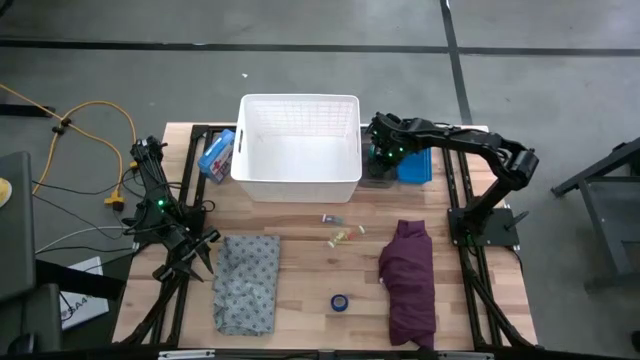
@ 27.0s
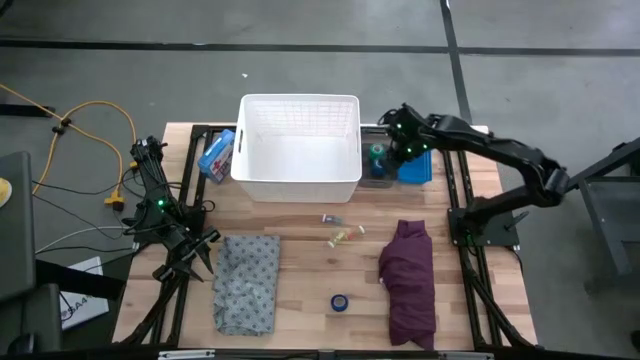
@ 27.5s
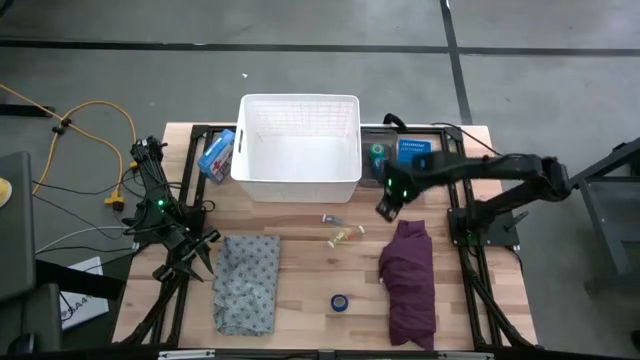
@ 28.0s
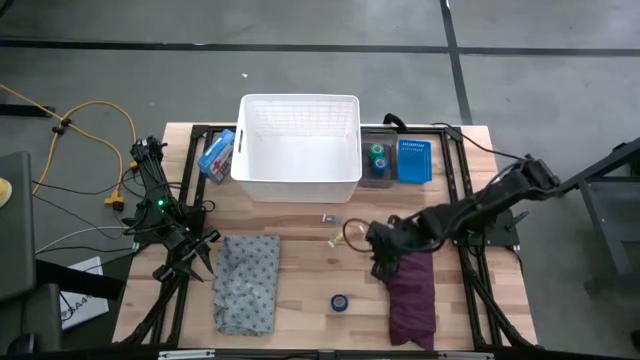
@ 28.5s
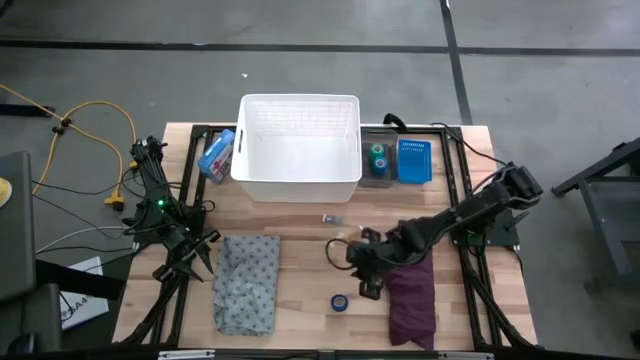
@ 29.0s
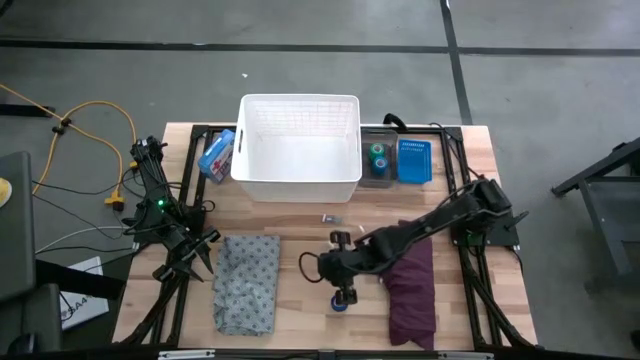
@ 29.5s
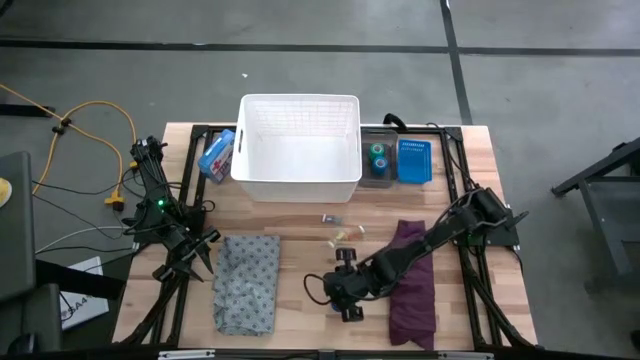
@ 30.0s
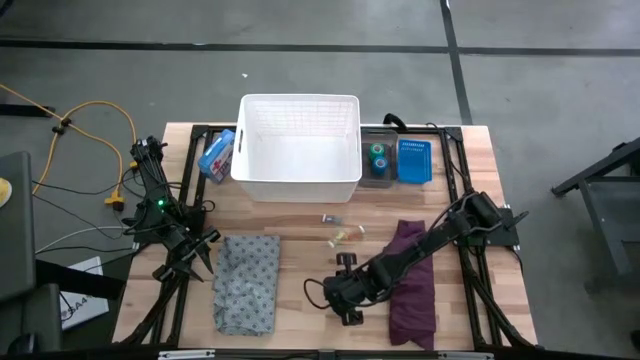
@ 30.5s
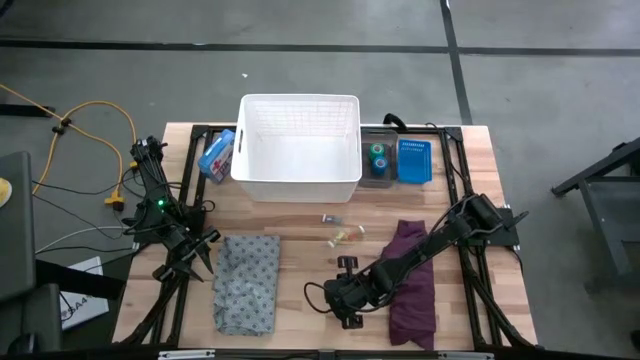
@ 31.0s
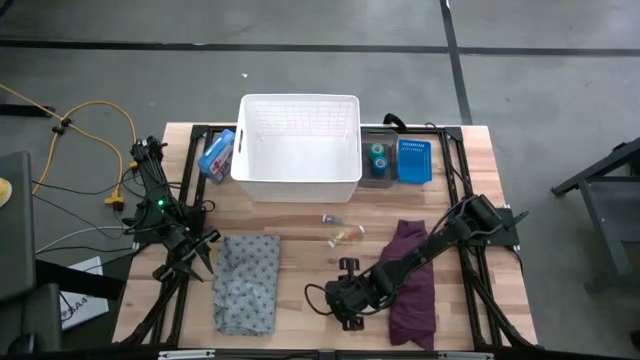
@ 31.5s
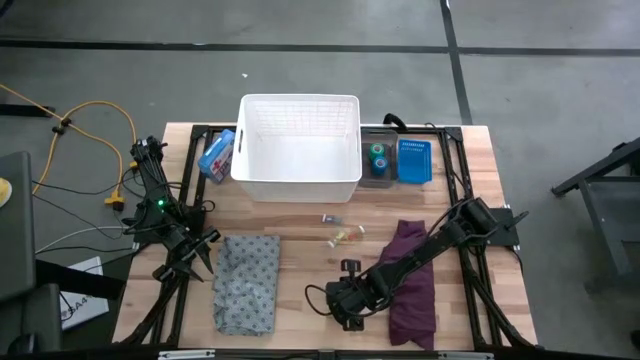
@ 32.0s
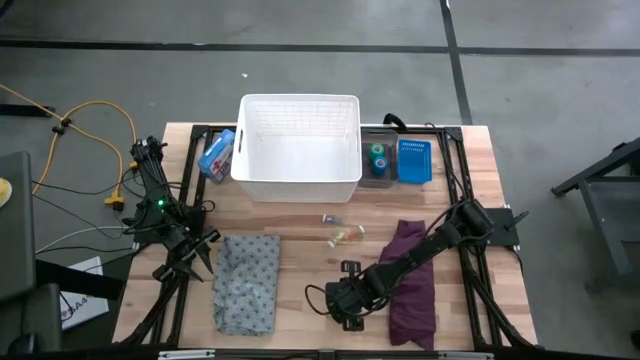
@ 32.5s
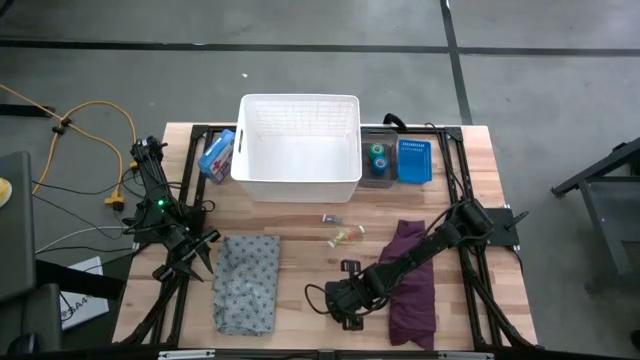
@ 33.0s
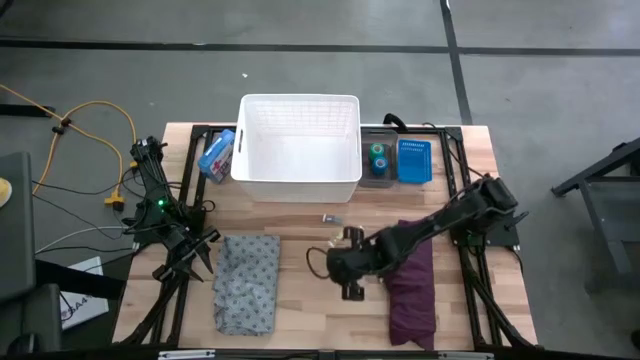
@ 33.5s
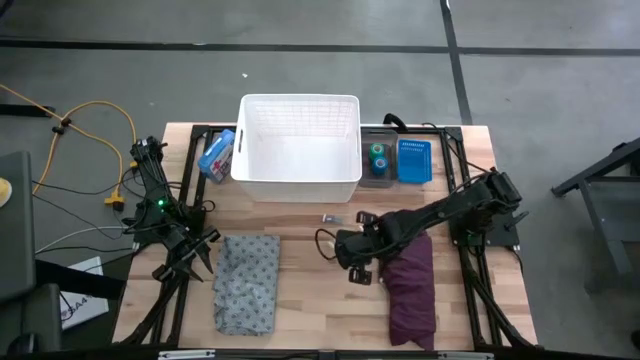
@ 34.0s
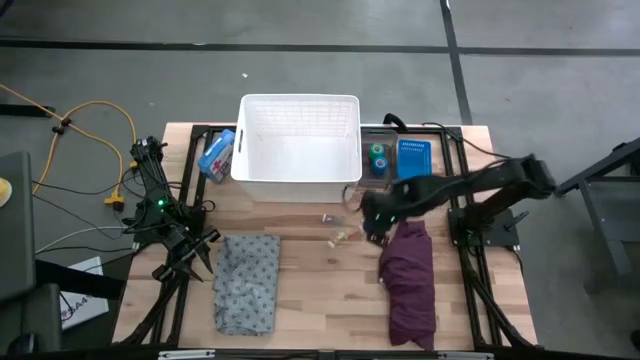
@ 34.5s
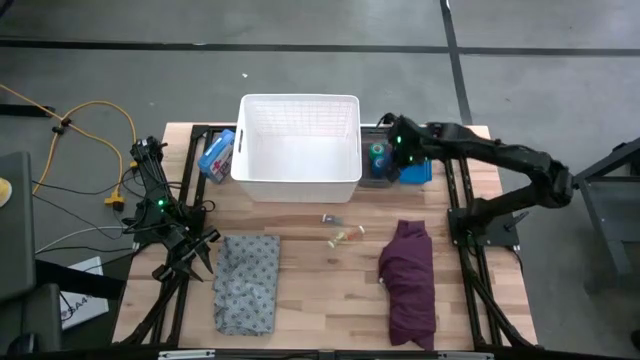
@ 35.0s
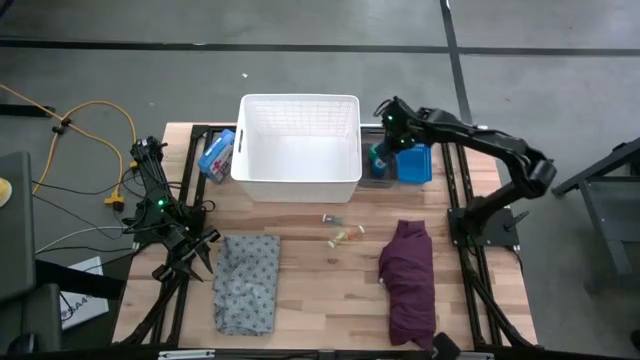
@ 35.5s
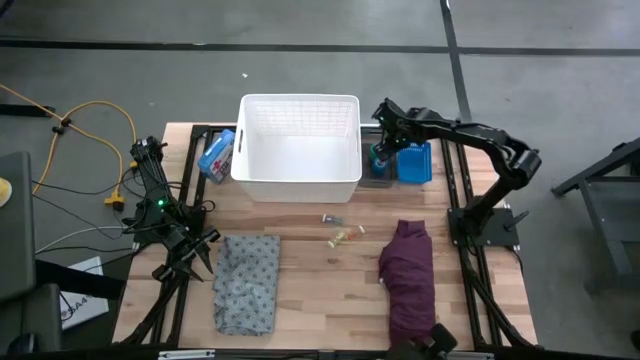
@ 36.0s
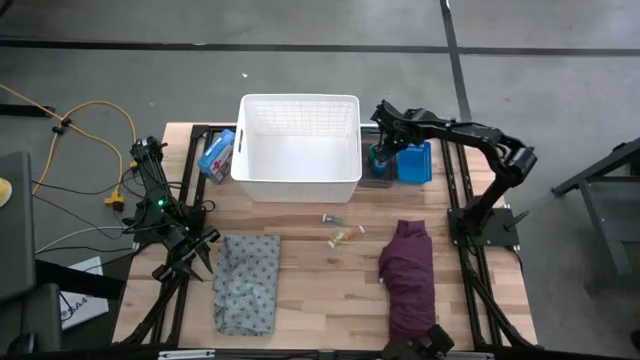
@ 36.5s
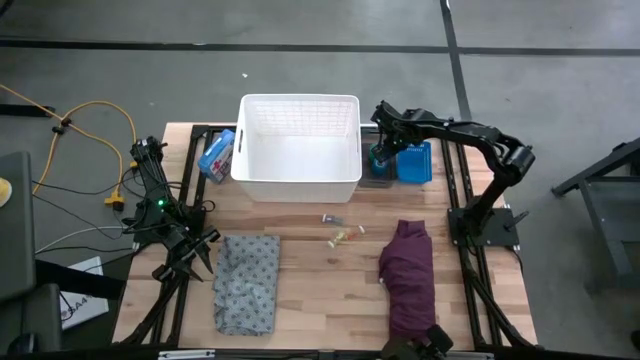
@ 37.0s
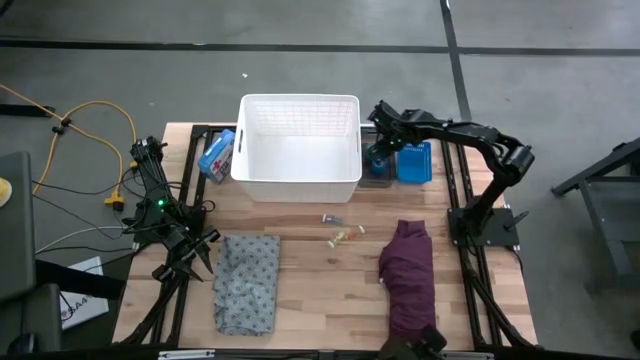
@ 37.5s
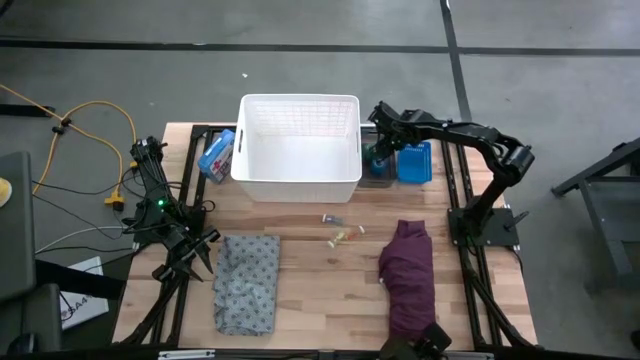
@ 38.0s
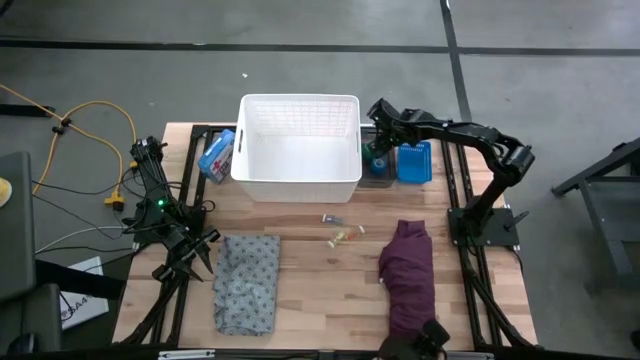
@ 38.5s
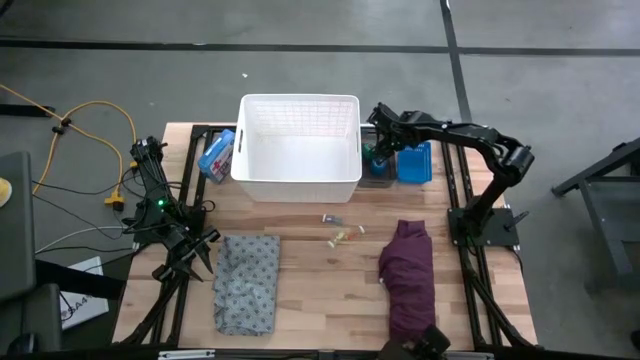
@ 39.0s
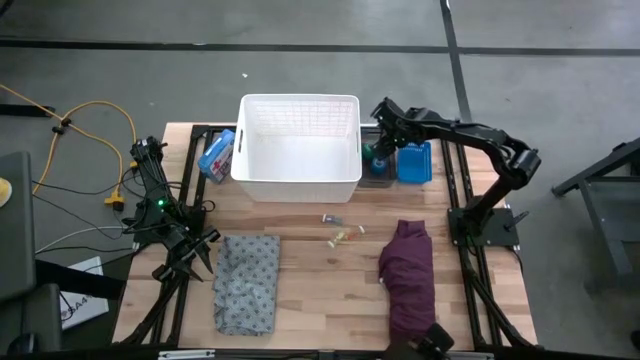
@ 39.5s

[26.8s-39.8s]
Task: Pick & Place Medicine items
Put the dark blue bandage into the black bin

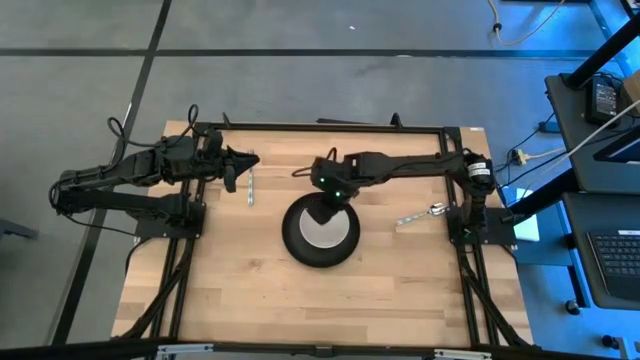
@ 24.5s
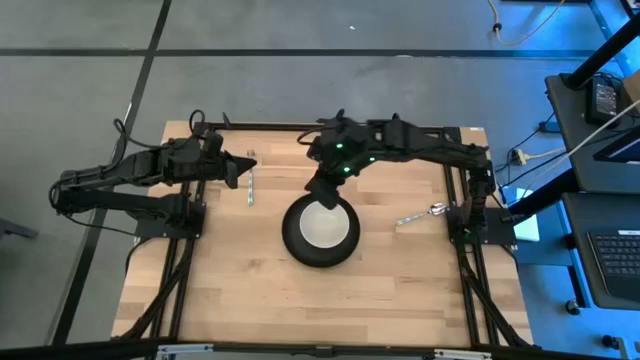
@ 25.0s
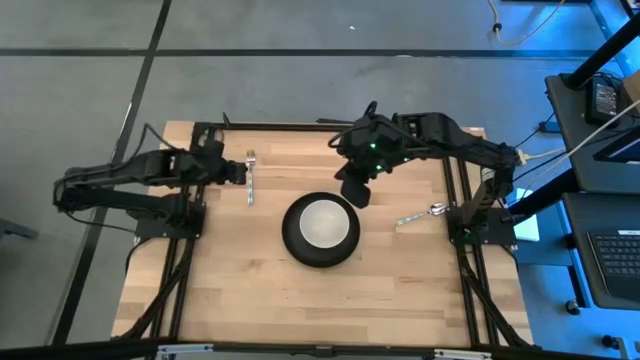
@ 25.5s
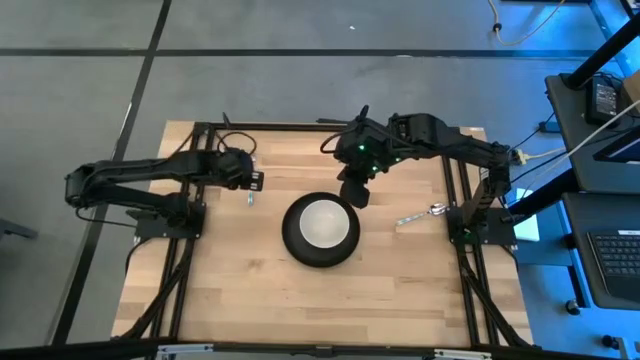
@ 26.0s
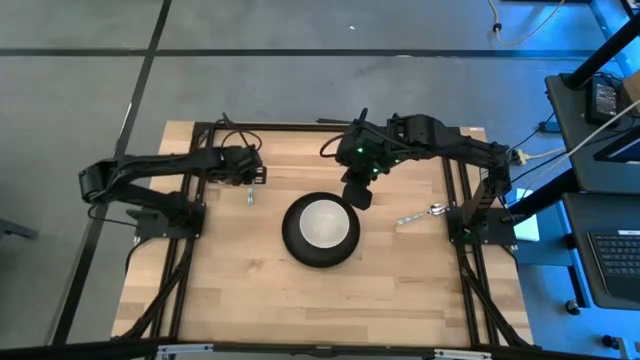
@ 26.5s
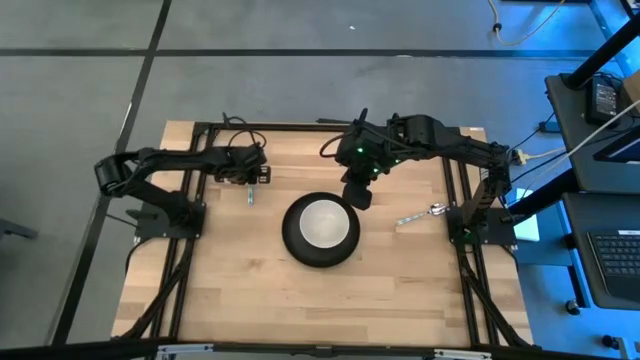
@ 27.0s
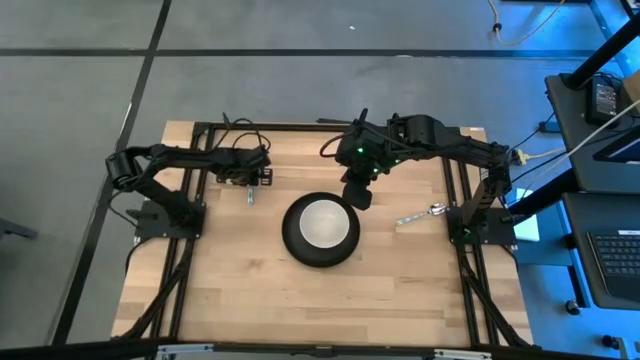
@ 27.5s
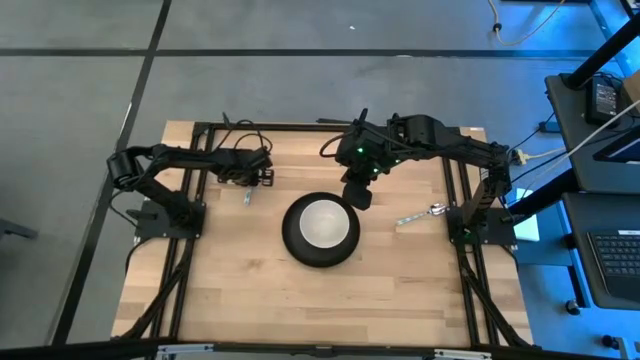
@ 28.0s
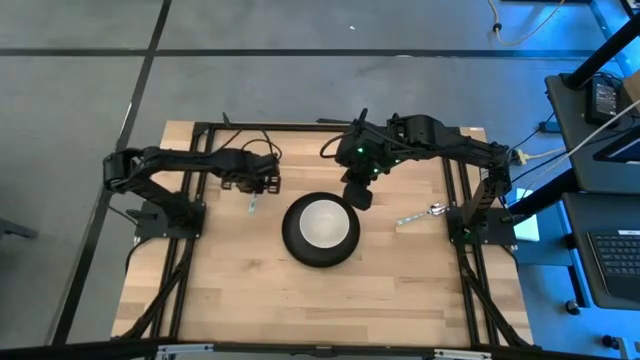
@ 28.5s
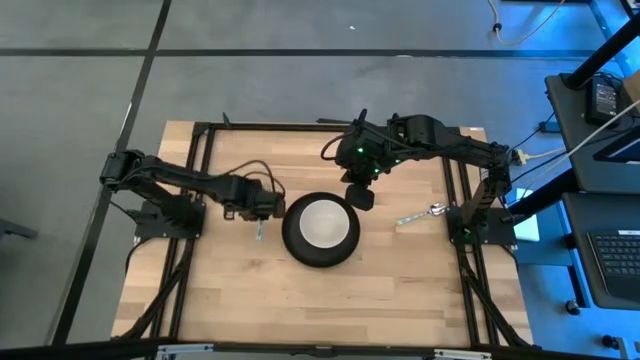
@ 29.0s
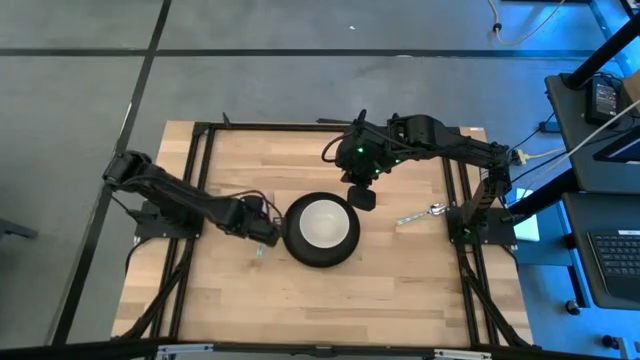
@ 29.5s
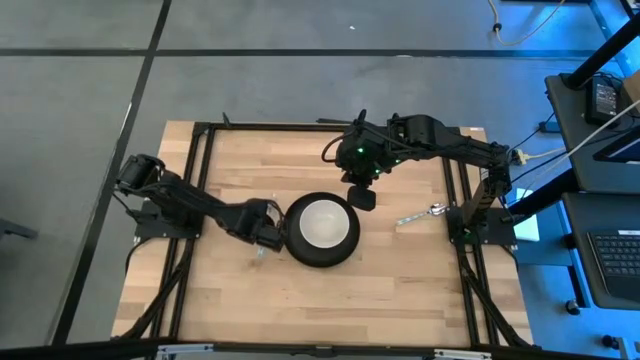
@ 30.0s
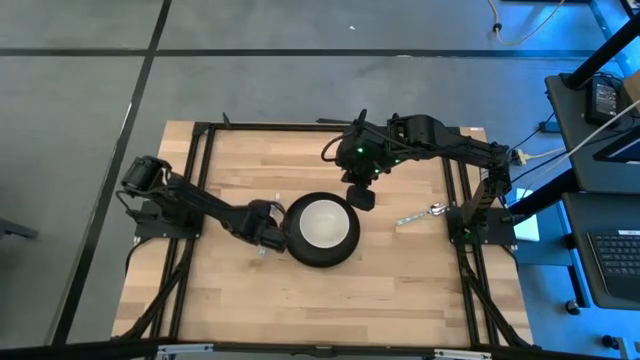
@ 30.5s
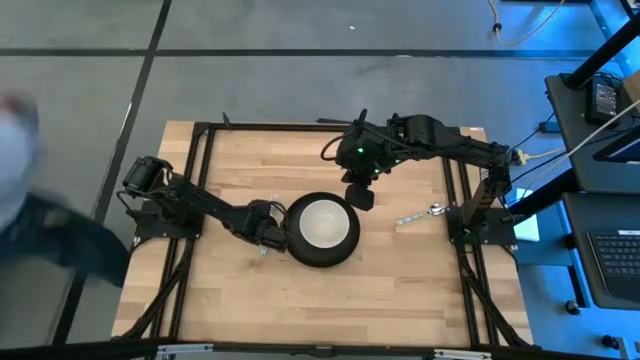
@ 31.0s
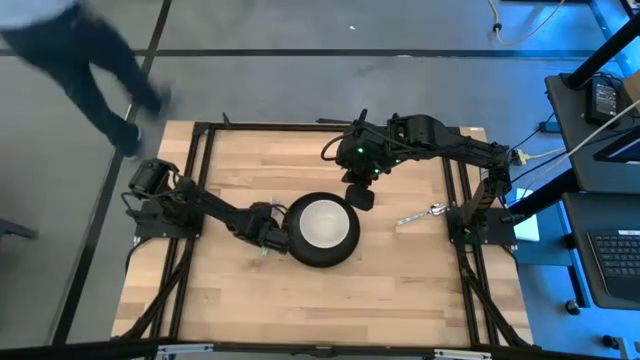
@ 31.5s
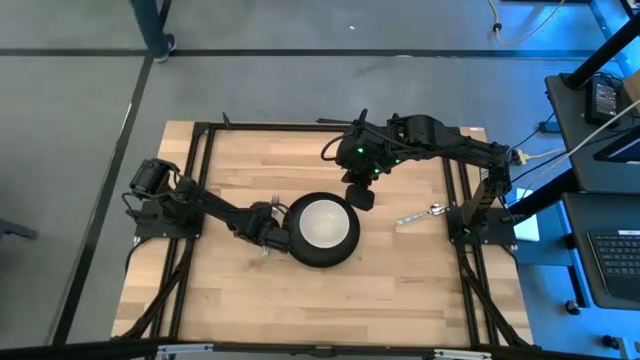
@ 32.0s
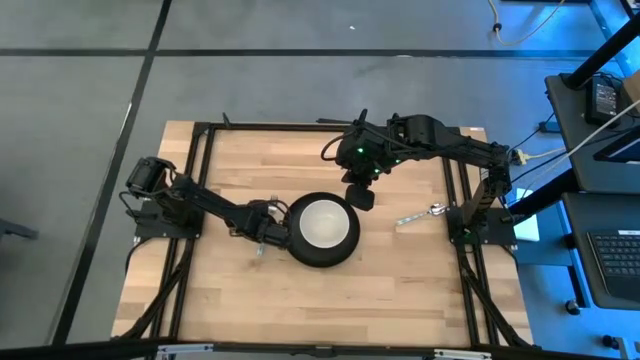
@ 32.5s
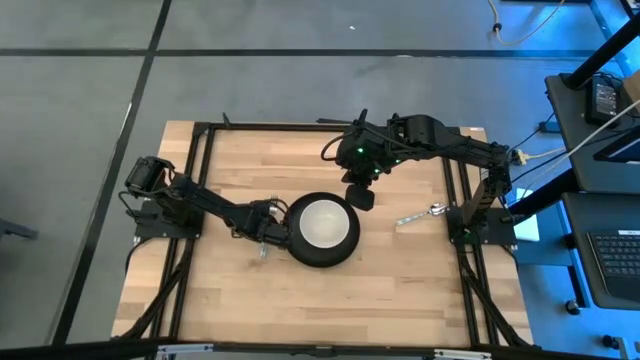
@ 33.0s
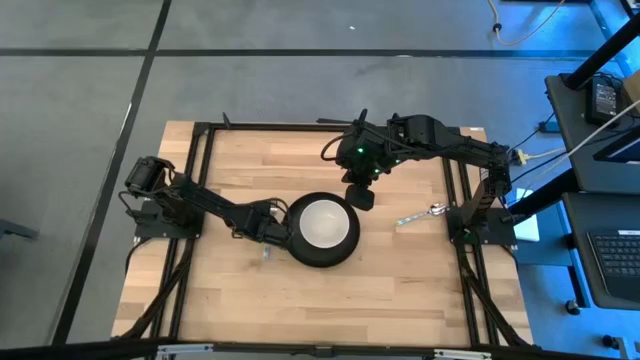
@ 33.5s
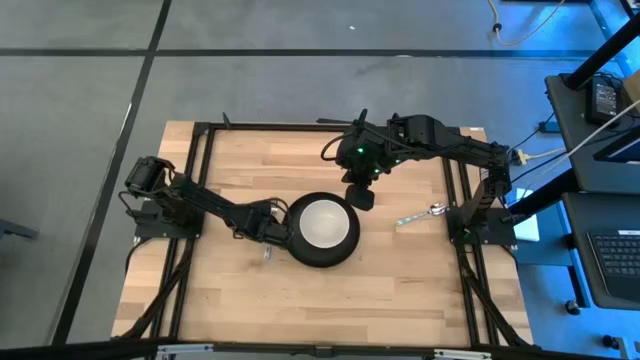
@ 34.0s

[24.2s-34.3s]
Task: Pick and place plate/cup/fork/spoon on tray
Move the green patterned fork to the left side of the black plate
